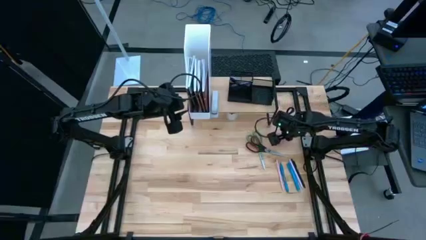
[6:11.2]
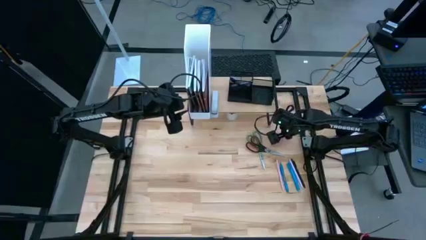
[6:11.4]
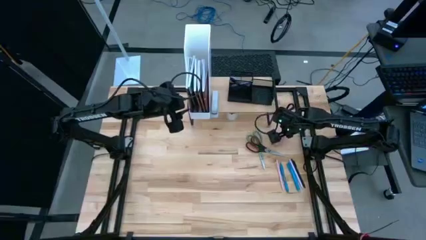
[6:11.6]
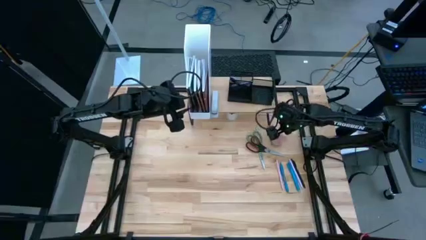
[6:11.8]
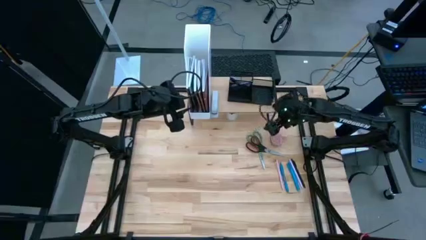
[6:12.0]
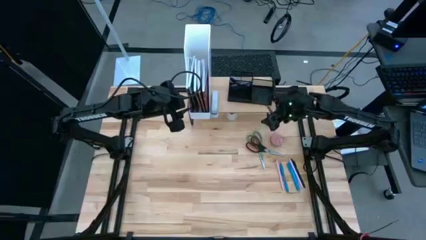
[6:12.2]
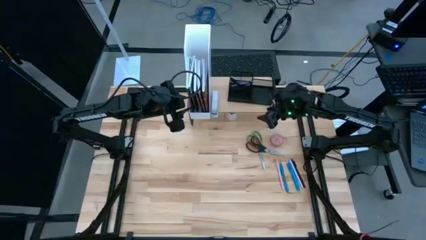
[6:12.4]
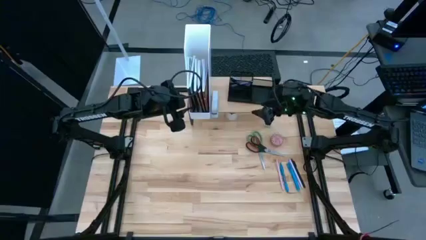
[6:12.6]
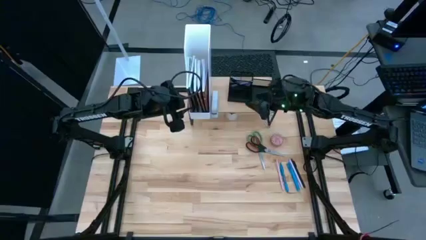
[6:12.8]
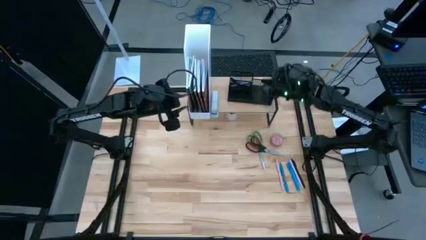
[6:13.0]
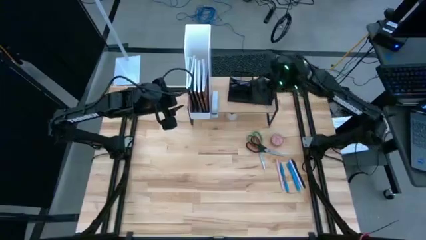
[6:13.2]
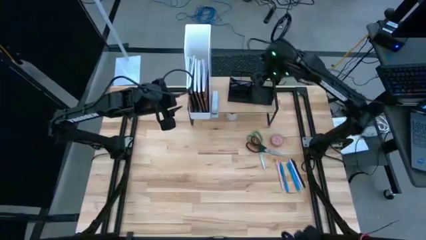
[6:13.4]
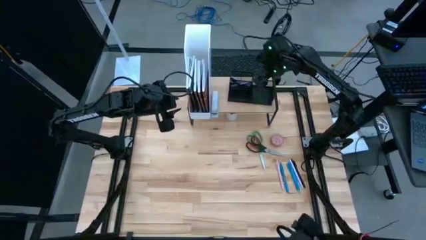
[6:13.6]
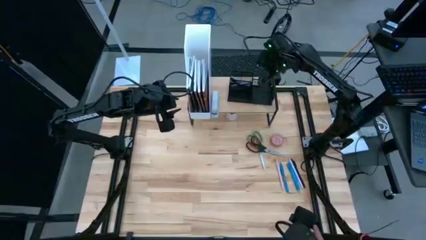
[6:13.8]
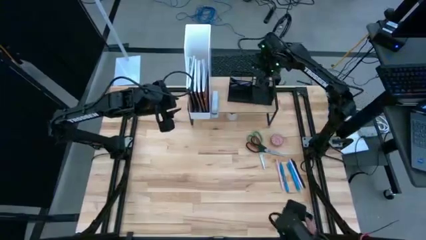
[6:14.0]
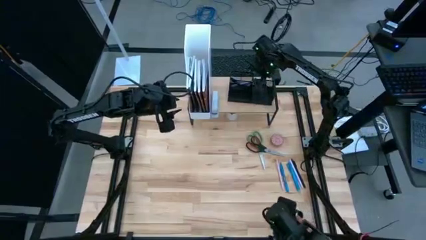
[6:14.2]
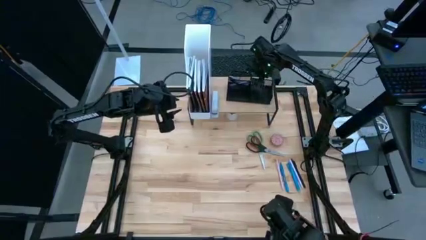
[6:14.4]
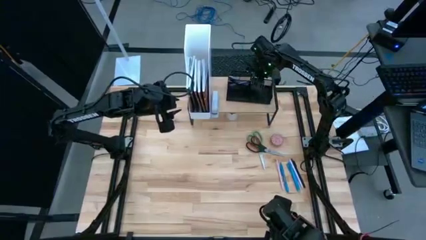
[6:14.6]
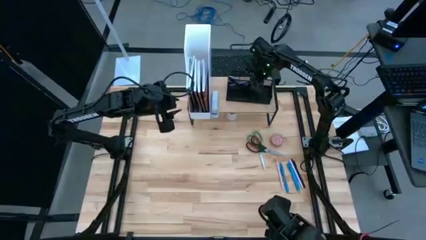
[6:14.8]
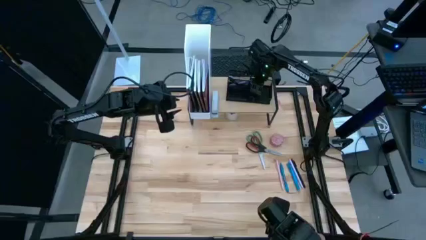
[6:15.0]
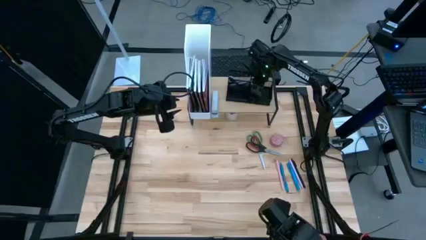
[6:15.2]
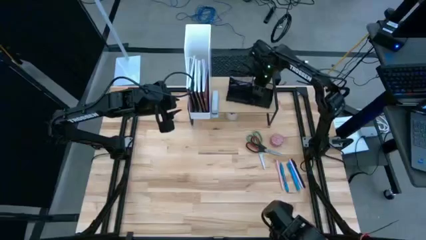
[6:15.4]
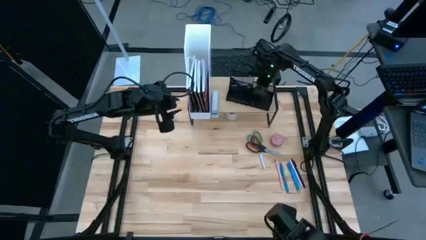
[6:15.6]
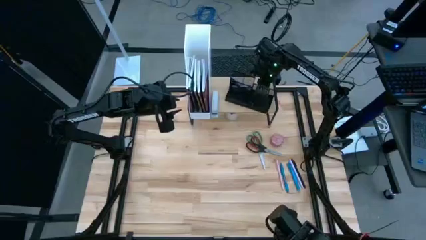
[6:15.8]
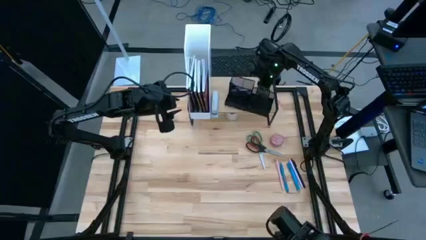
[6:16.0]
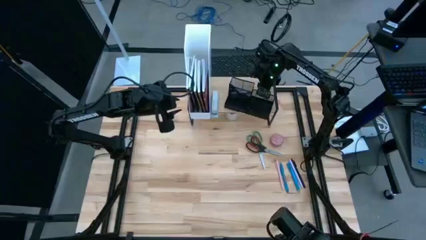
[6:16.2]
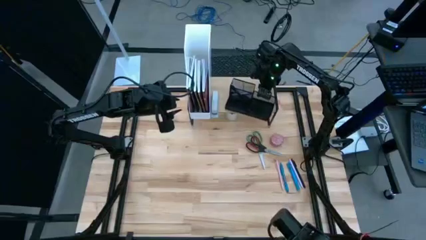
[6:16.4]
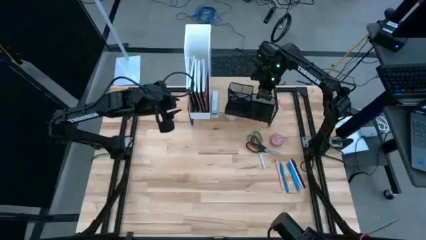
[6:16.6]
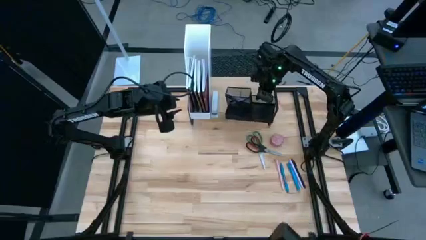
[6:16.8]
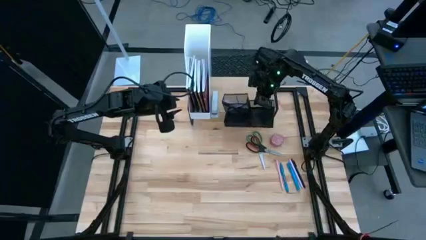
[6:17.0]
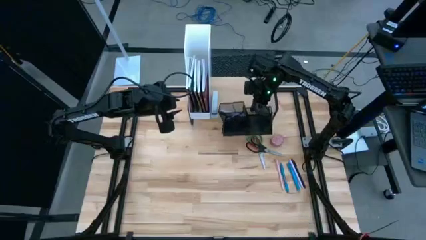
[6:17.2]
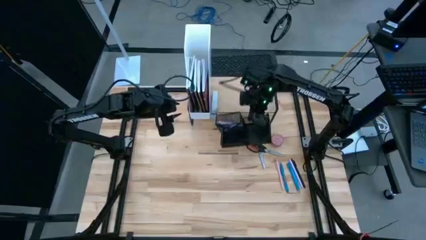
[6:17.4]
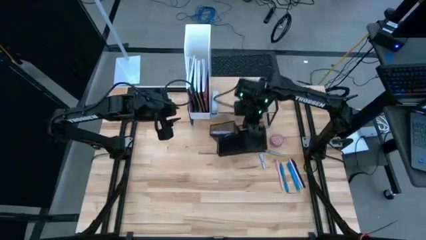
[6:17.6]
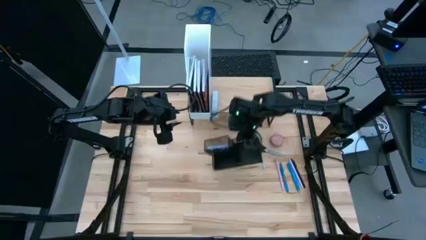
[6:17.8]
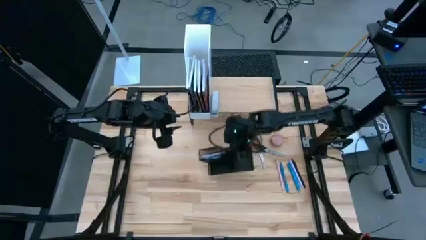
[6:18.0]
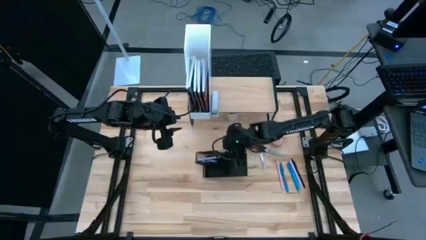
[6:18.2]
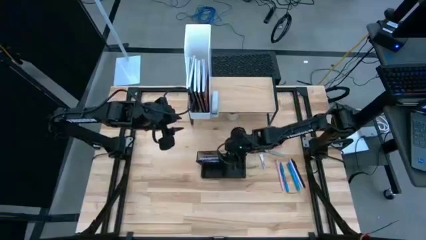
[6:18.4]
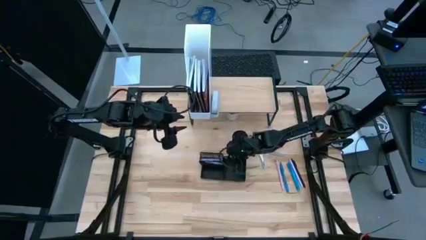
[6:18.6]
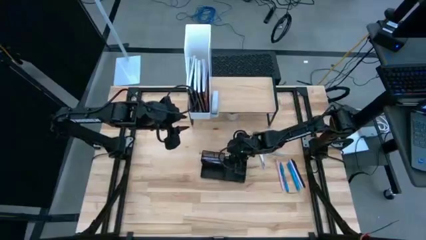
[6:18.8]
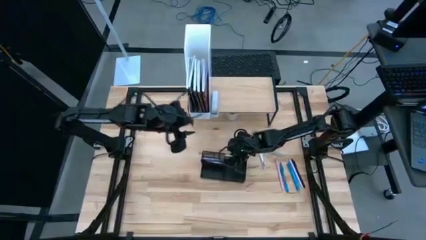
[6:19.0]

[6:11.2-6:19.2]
Task: Stock shelves
Remove the desk organizer from the shelf

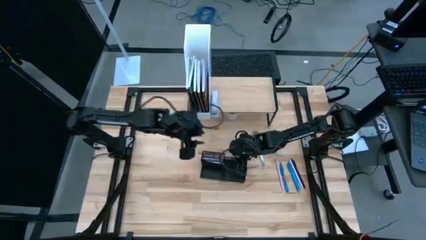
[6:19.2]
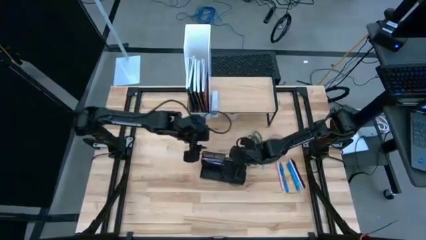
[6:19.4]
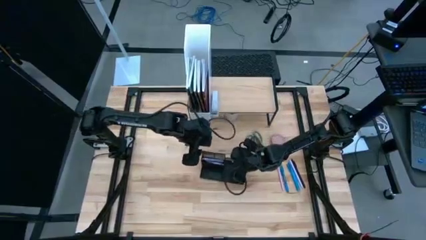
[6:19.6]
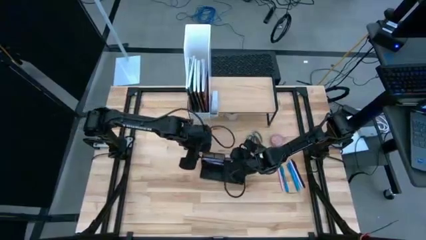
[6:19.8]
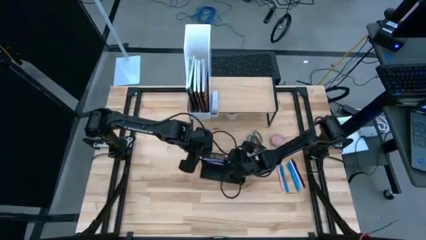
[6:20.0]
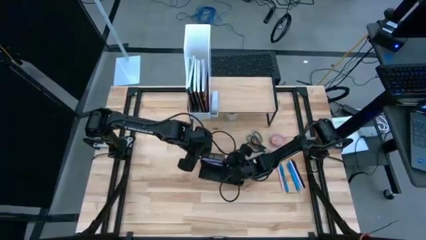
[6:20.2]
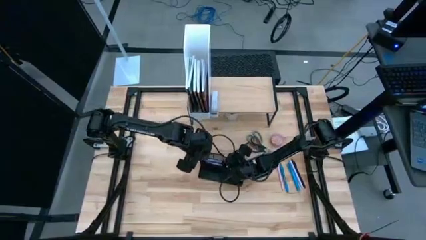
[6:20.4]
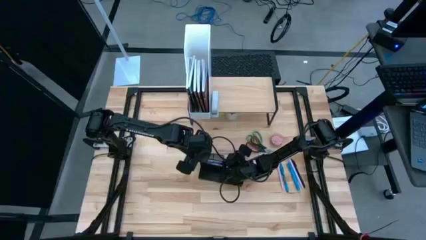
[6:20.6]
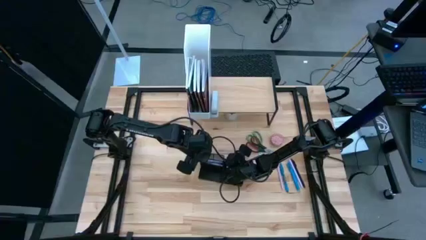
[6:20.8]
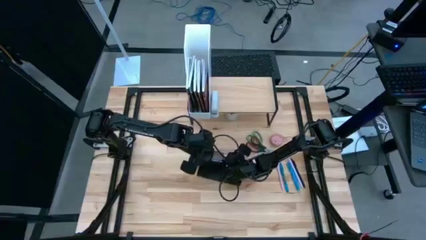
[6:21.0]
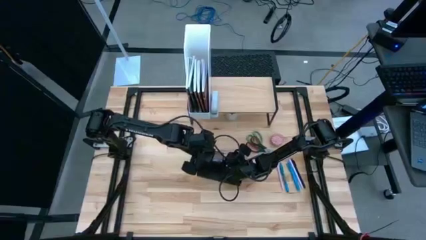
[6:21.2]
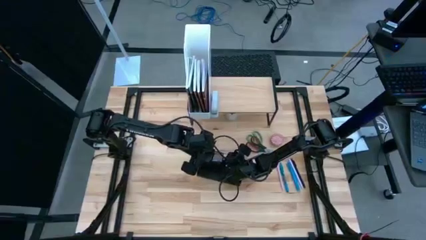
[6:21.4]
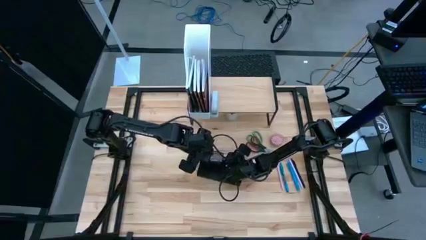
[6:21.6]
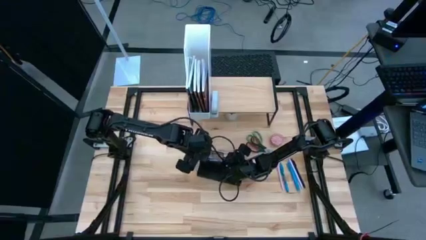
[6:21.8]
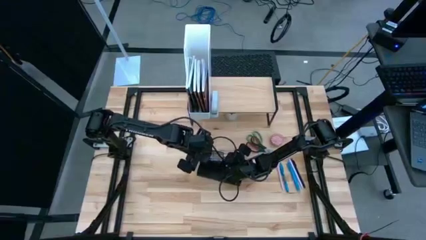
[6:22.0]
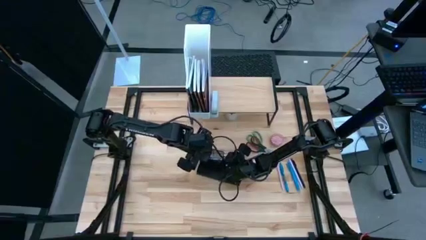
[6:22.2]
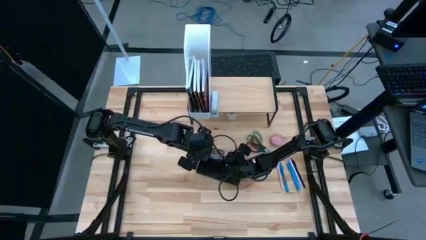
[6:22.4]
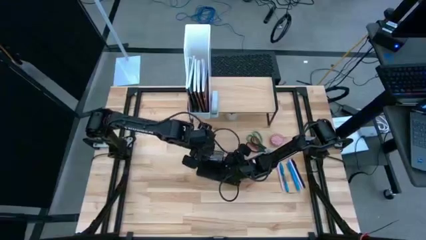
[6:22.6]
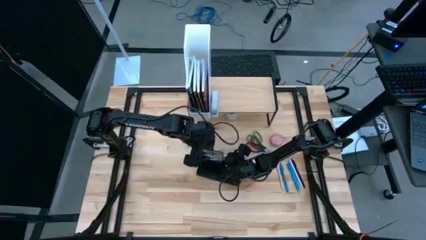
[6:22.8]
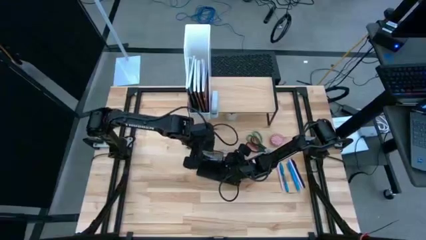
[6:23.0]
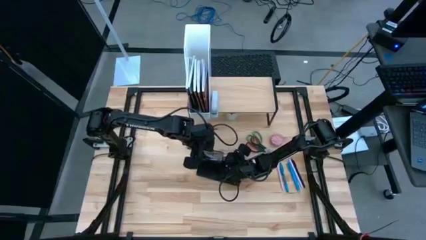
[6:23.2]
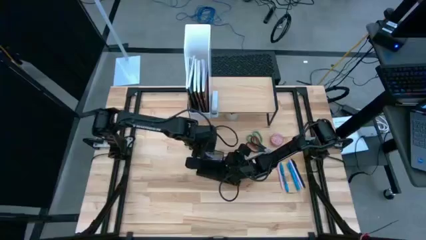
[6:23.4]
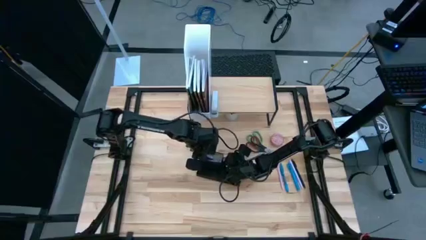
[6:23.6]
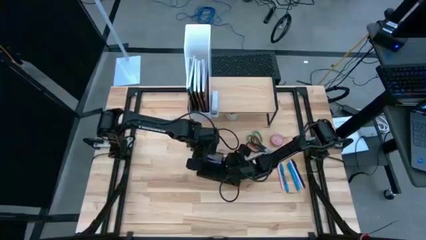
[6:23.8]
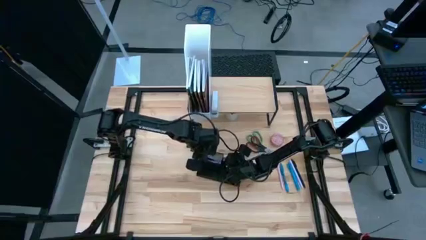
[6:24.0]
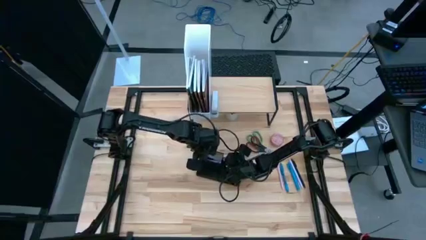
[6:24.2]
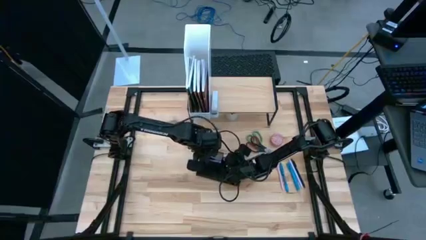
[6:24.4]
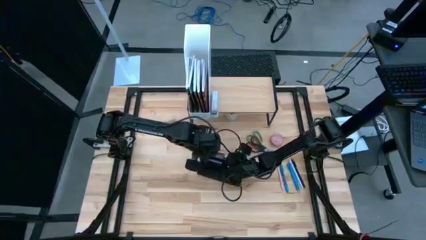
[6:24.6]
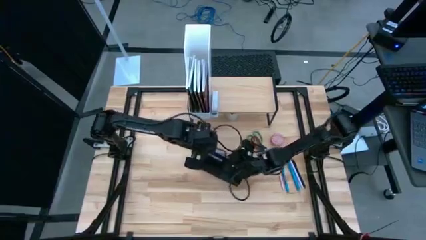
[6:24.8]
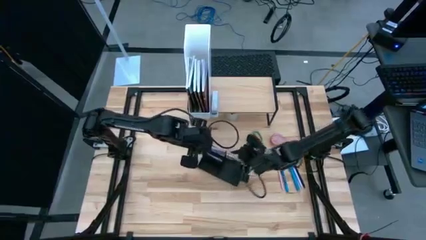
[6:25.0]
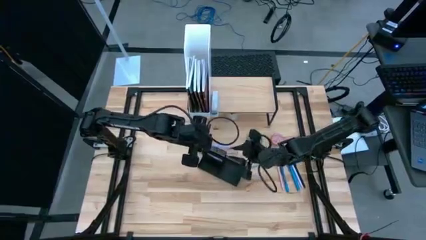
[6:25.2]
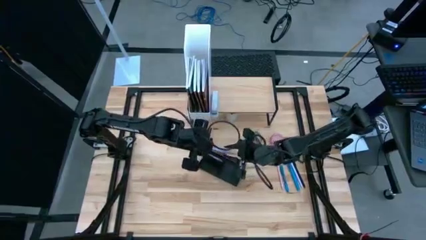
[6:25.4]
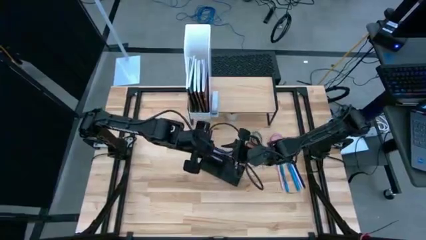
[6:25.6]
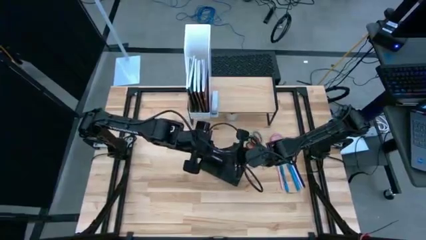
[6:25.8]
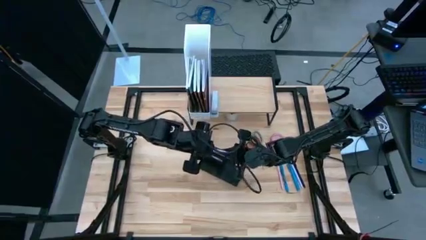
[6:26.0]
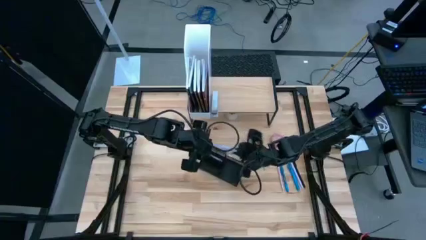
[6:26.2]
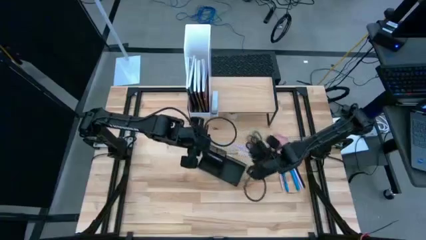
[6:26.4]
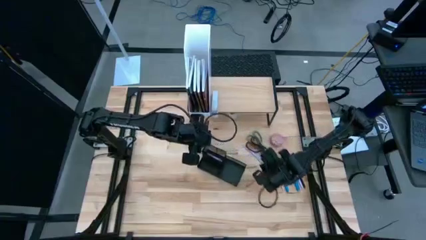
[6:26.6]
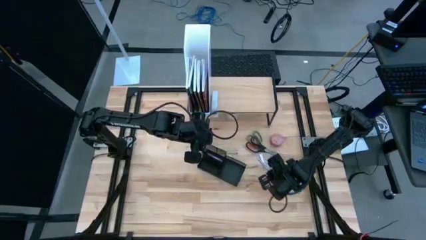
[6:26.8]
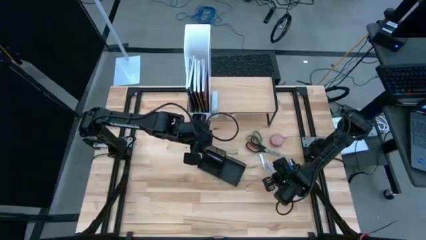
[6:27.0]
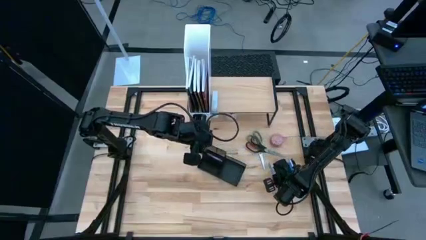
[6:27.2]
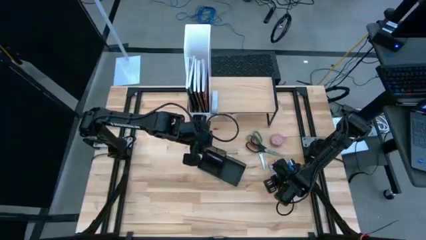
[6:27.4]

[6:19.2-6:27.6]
Remove the light blue pen from the desk organizer
